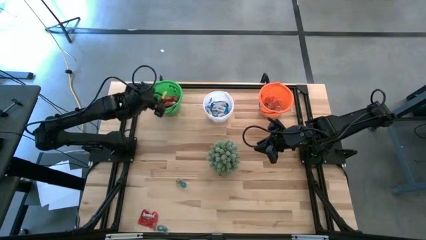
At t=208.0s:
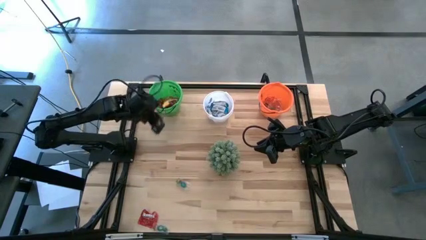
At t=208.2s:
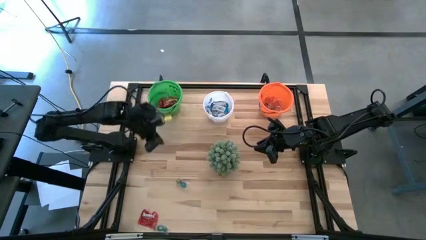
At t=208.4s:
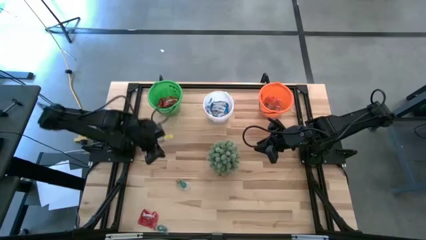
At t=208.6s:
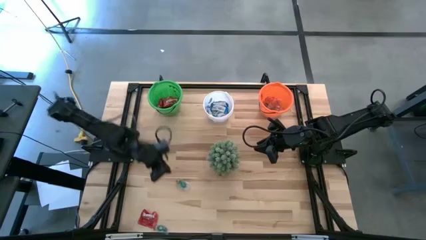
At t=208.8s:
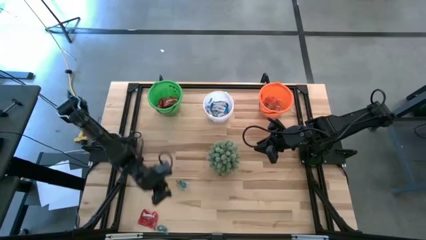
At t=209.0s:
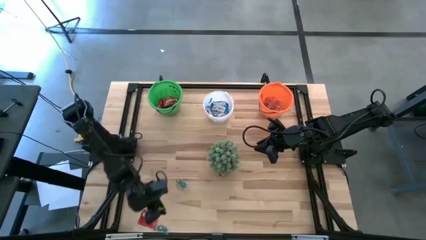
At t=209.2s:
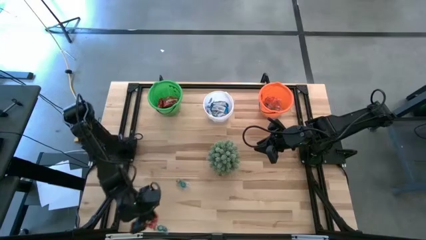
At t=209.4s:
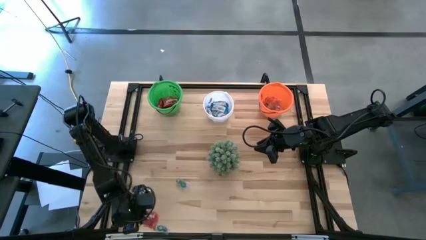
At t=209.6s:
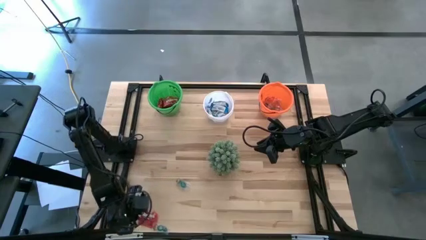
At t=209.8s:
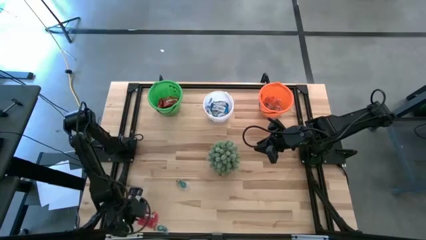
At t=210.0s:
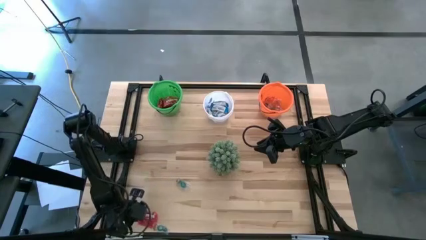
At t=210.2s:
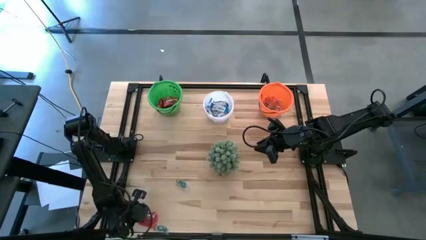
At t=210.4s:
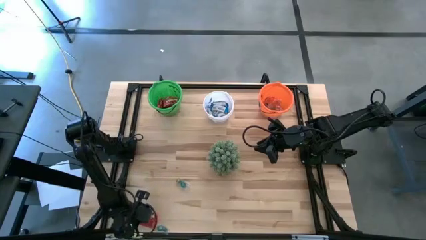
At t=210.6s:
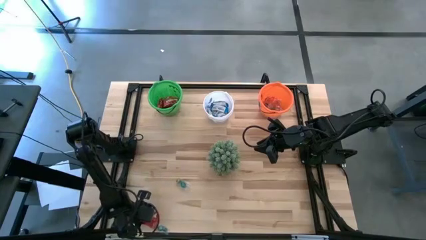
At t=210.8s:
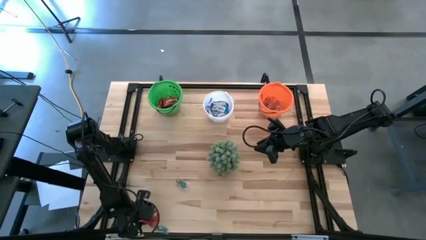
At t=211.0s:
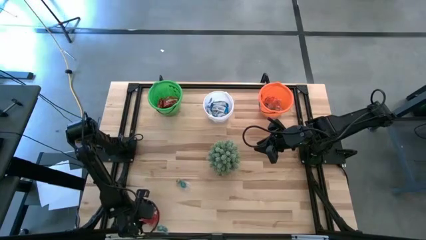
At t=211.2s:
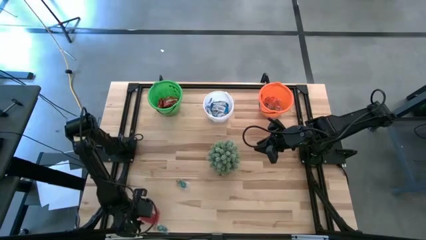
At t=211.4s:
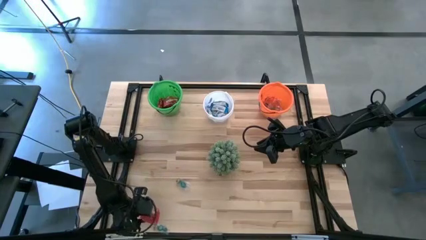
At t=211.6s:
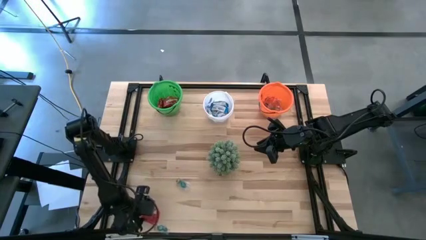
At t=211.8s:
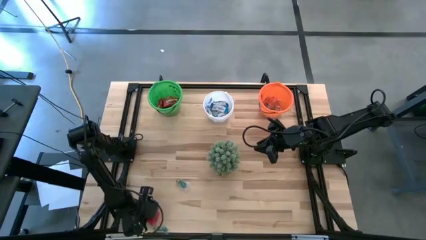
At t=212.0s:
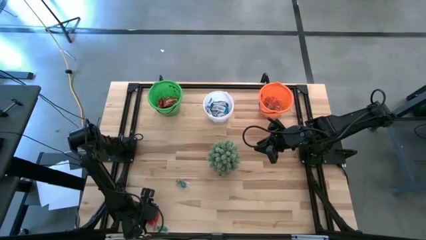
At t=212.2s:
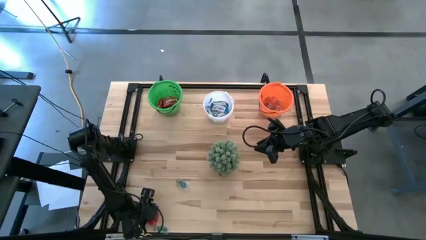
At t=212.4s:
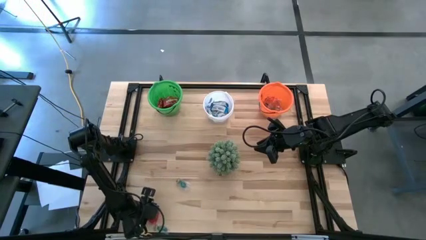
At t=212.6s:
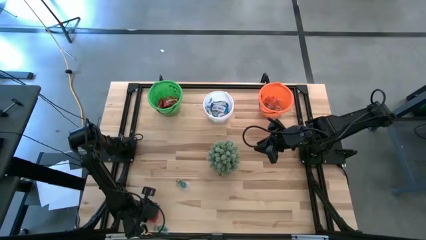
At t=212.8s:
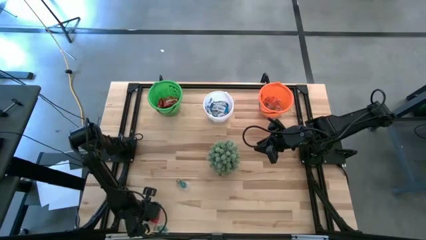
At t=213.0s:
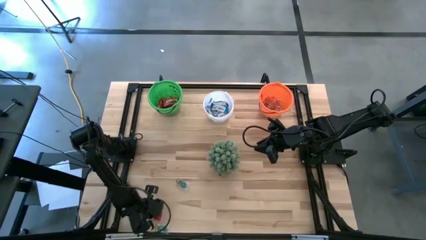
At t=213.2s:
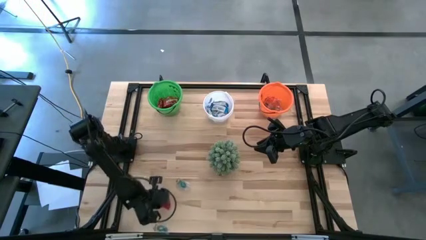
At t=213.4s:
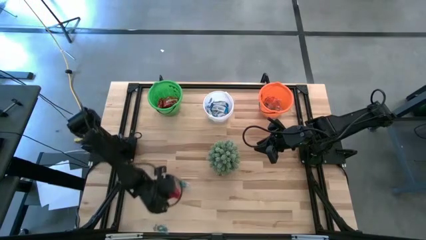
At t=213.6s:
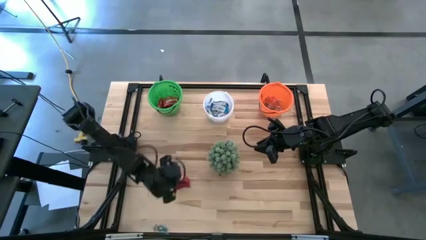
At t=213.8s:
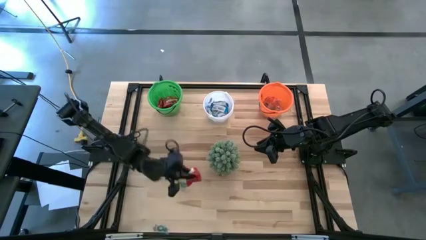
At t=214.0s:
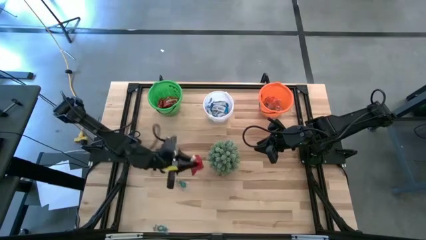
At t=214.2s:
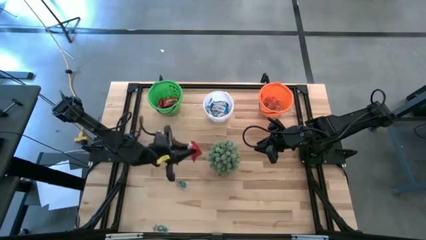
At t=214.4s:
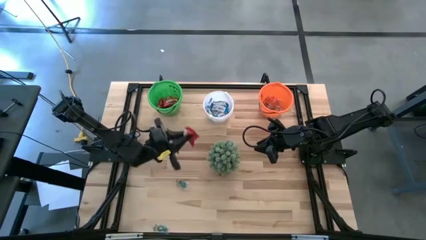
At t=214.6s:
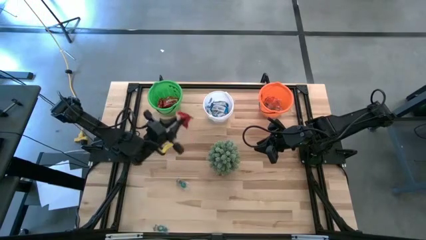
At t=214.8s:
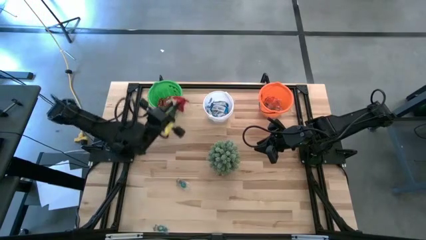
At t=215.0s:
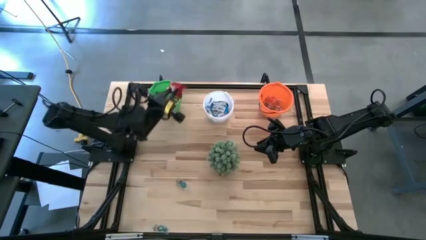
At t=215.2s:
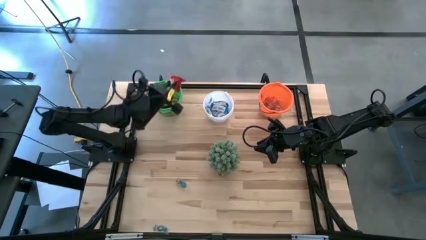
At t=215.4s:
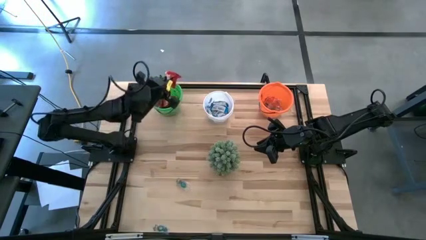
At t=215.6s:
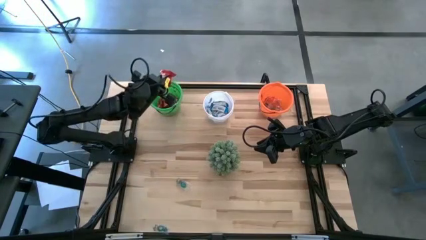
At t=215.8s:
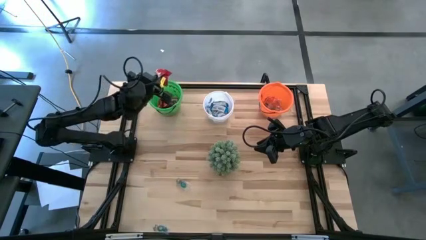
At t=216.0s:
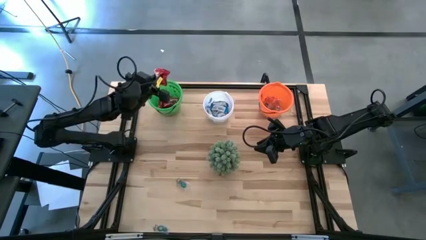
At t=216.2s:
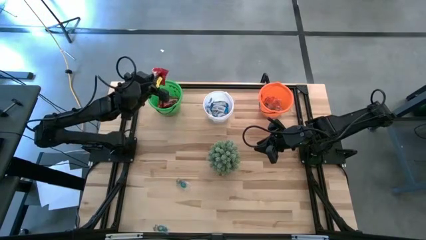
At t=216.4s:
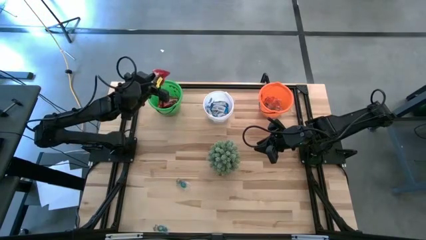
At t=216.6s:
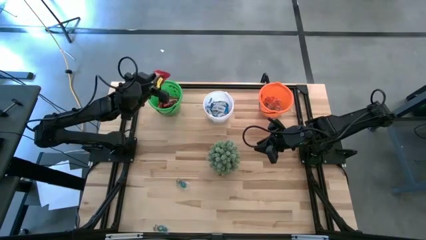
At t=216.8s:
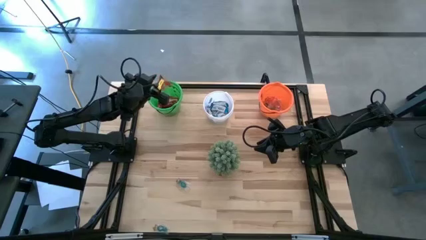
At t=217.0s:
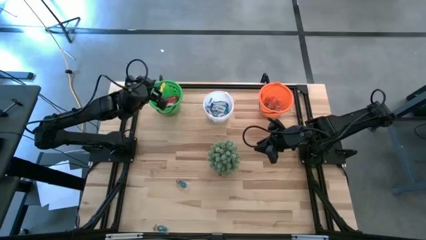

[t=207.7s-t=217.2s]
Task: Sort candy
Put the red candy into the green bucket

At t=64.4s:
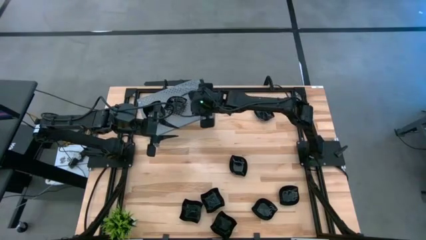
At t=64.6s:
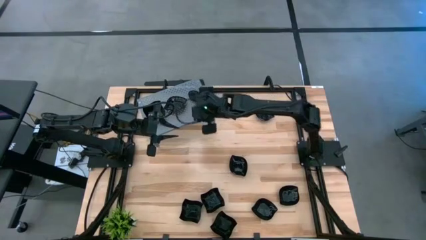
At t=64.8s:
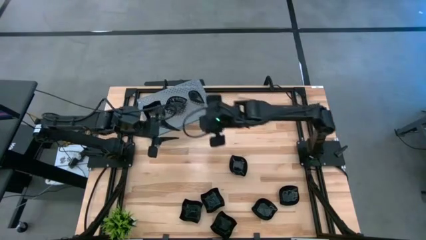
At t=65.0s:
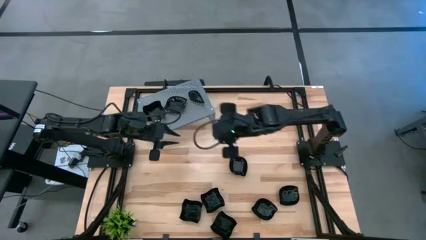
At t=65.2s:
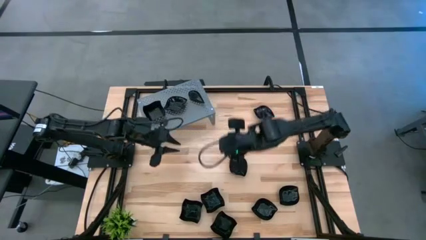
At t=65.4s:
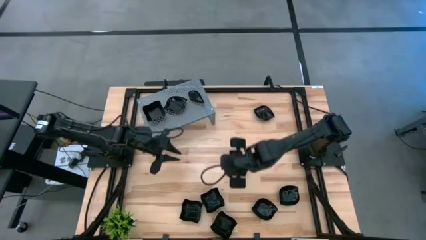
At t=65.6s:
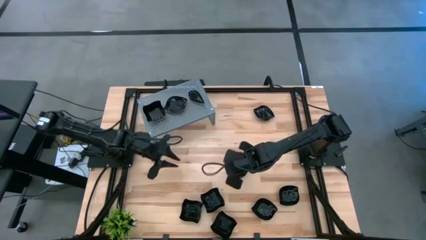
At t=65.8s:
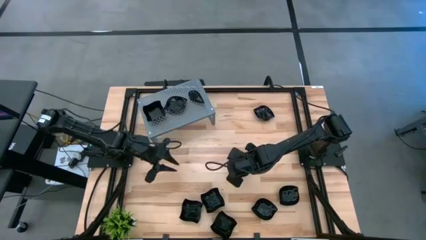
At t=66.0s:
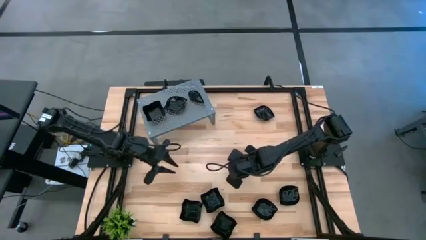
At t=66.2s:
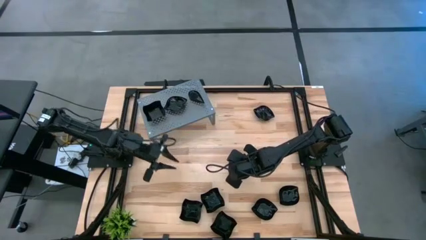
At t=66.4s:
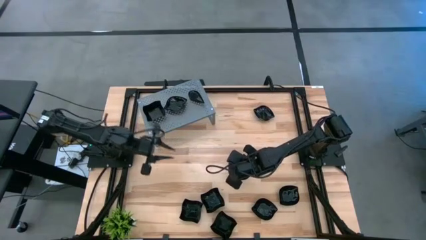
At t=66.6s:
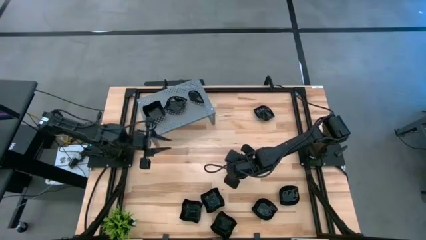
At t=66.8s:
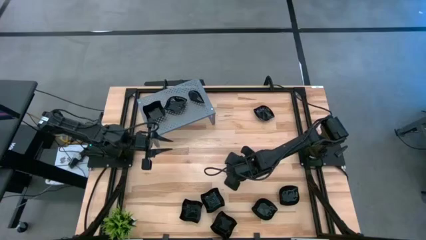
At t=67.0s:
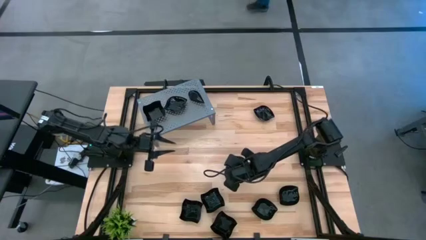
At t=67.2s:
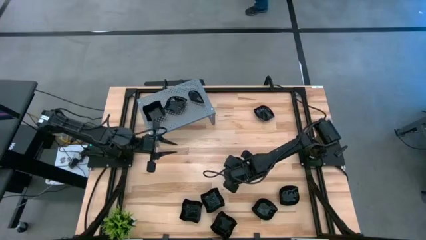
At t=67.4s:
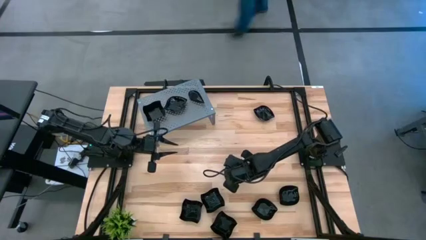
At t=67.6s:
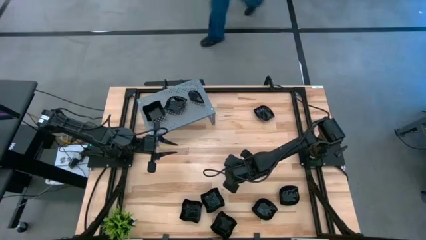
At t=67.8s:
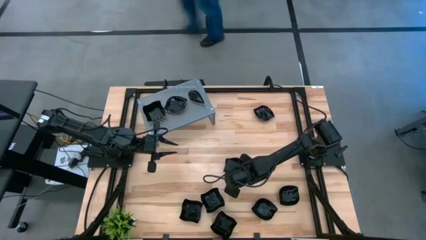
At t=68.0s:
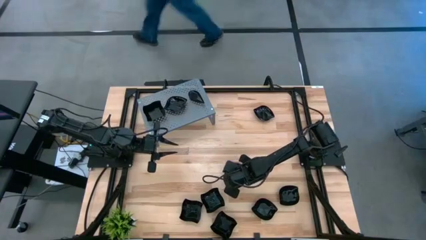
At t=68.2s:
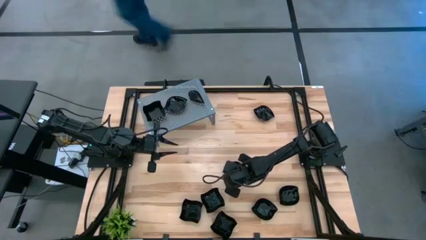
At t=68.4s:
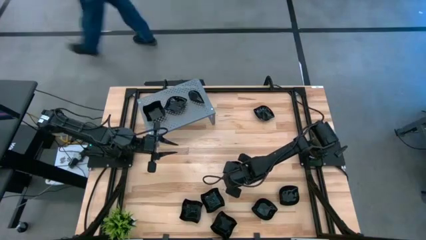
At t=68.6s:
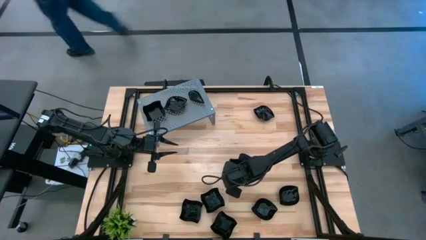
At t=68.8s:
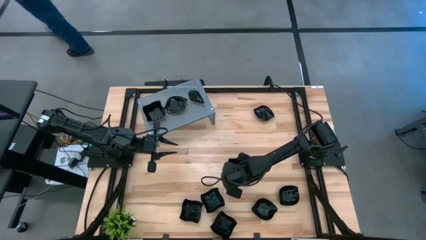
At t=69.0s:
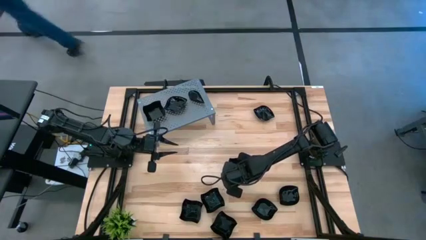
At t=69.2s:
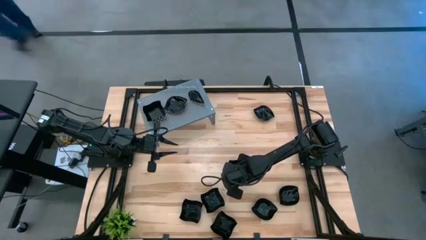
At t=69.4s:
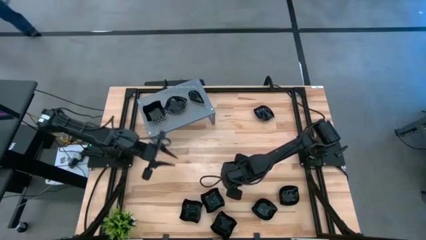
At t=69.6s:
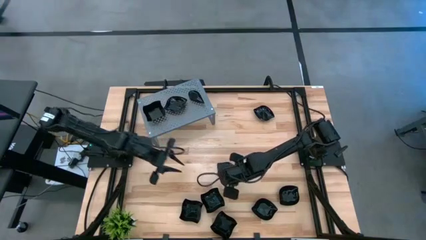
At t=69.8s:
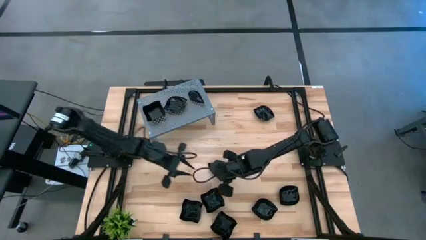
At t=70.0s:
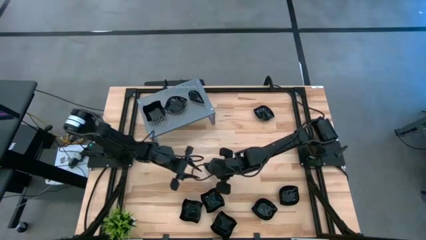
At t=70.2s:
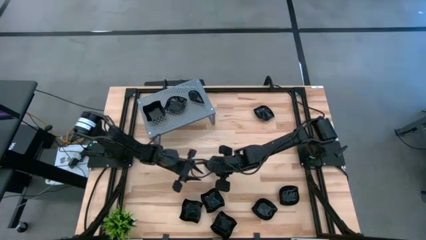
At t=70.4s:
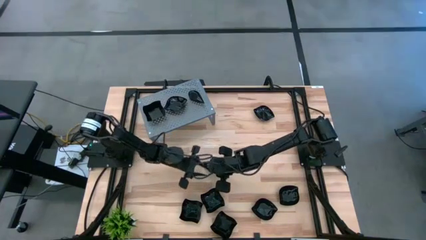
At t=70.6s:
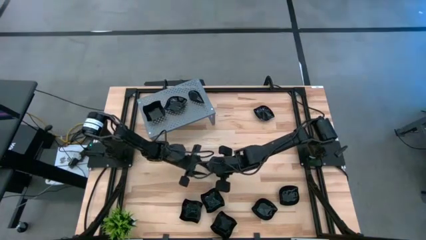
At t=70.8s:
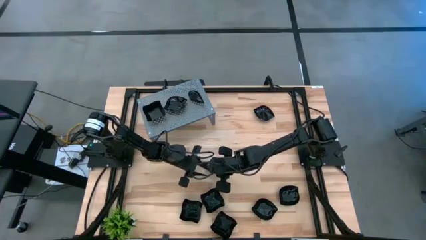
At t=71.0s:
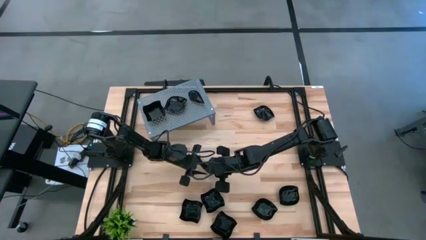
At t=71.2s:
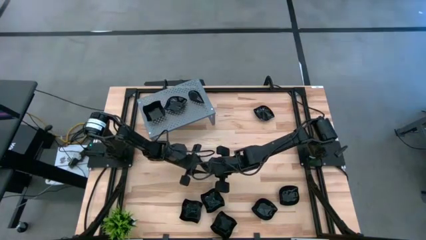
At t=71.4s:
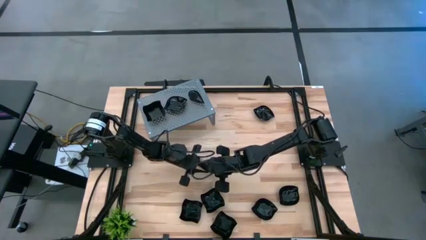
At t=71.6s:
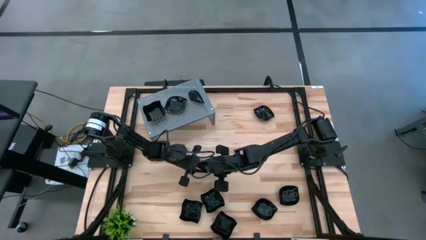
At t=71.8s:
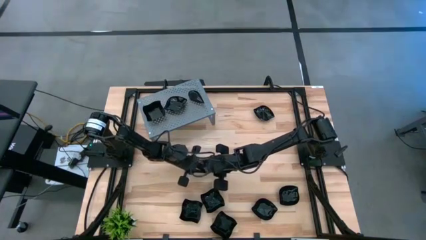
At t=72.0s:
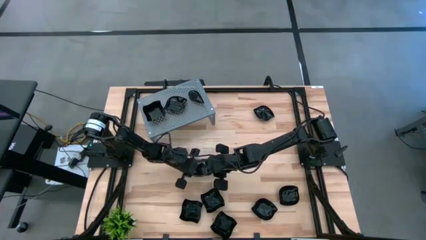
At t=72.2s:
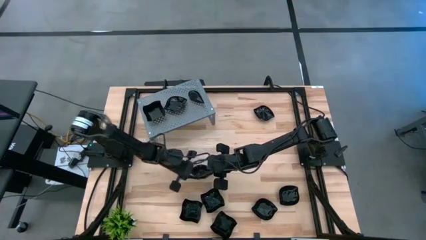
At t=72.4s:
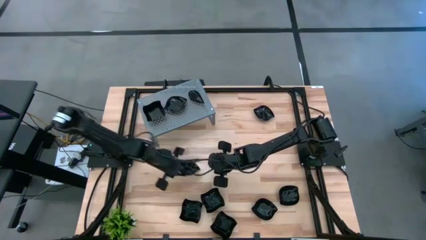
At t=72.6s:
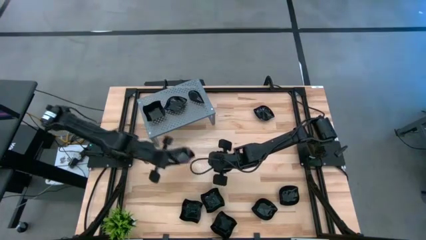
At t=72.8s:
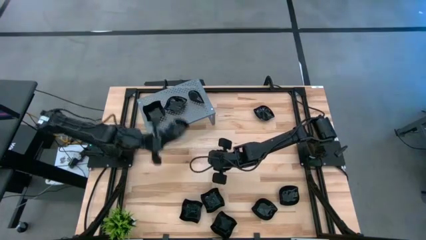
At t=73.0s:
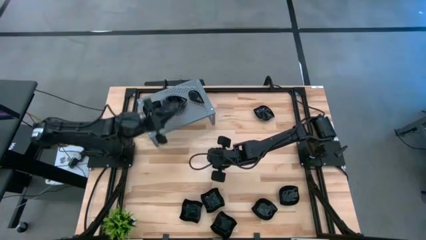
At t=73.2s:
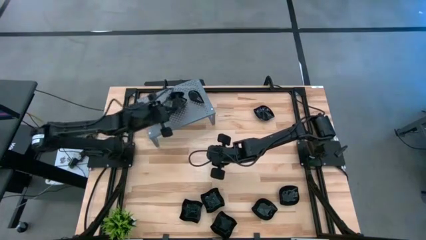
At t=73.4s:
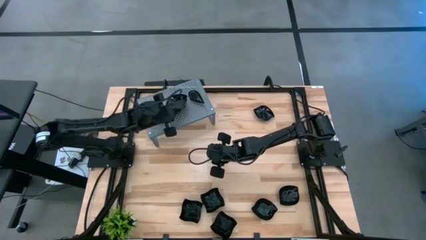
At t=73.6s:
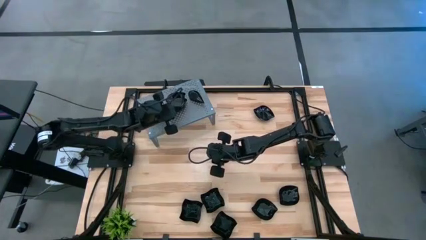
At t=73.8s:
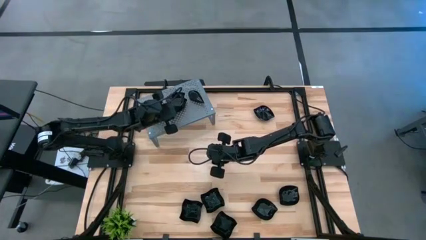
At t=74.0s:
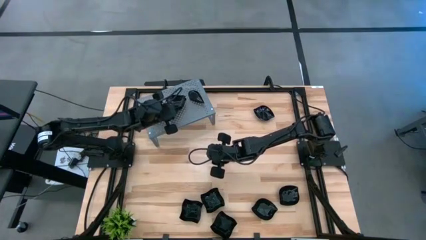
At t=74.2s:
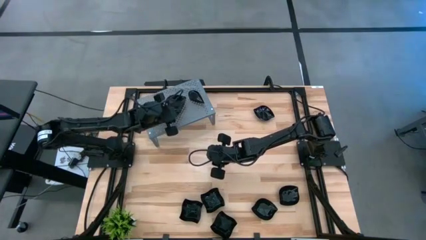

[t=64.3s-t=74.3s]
Task: Pick & Place Mini shaped plates
Stack the black leaf shaped plate on top of the black leaf shaped plate on the shelf
